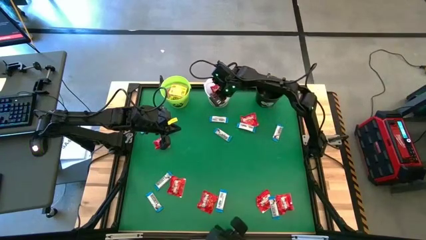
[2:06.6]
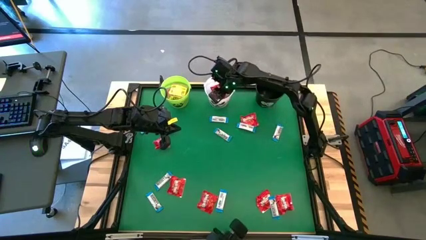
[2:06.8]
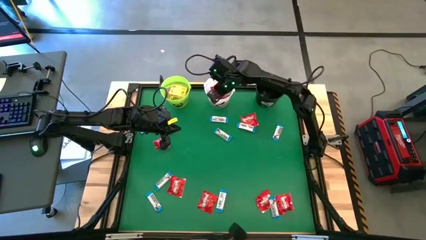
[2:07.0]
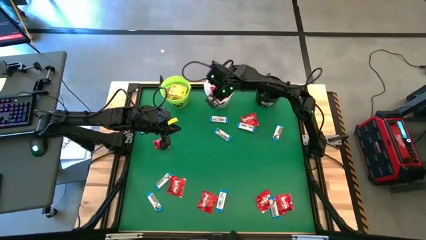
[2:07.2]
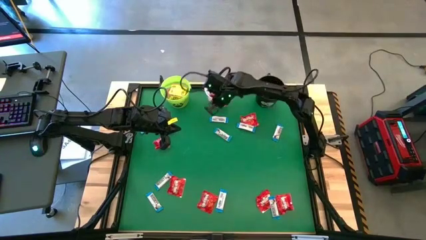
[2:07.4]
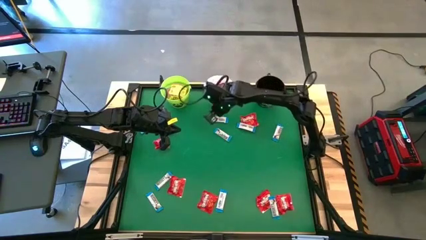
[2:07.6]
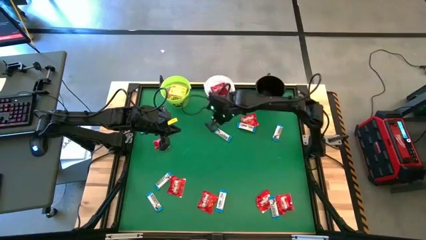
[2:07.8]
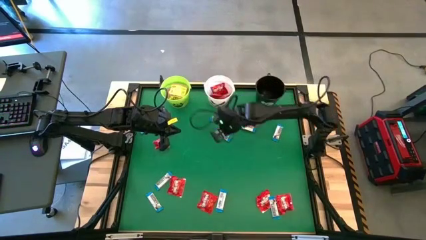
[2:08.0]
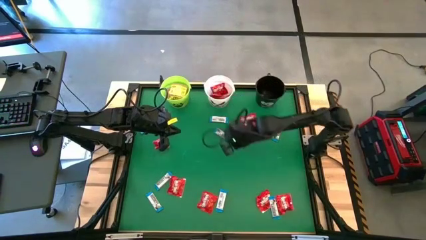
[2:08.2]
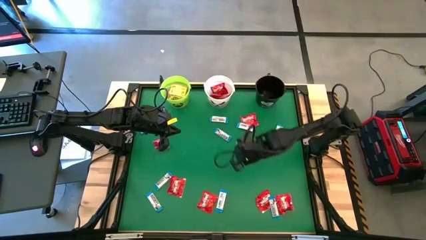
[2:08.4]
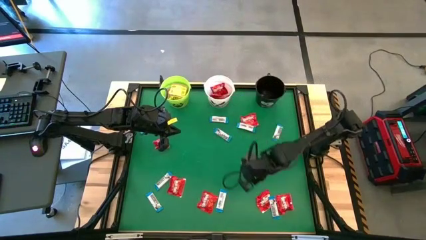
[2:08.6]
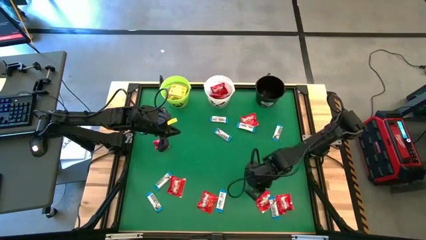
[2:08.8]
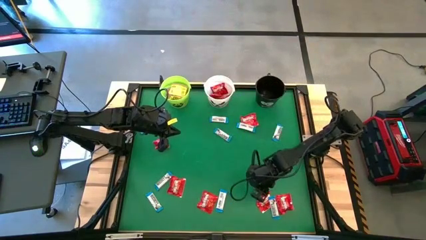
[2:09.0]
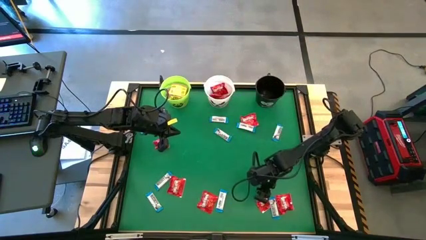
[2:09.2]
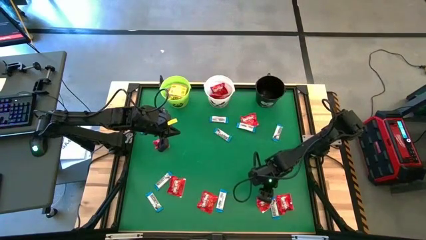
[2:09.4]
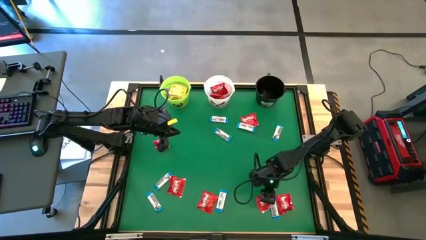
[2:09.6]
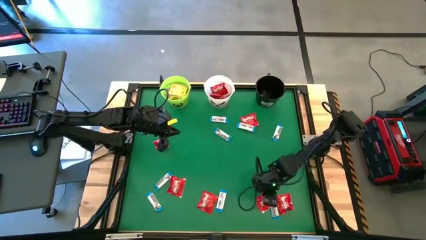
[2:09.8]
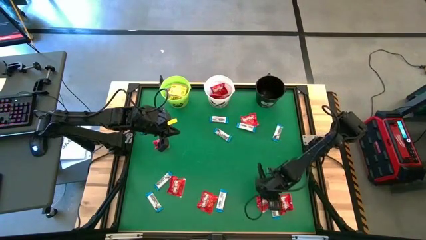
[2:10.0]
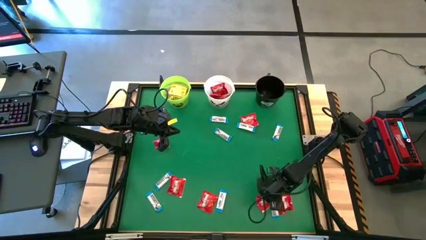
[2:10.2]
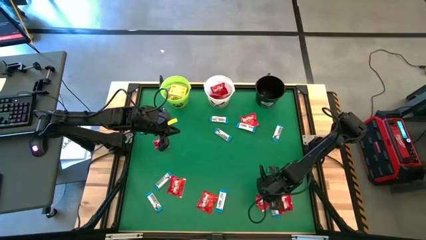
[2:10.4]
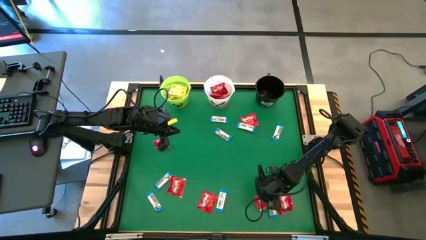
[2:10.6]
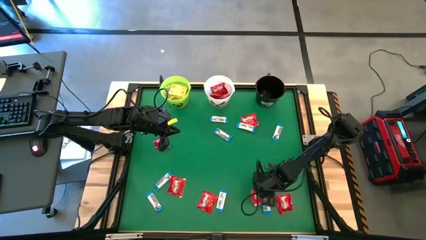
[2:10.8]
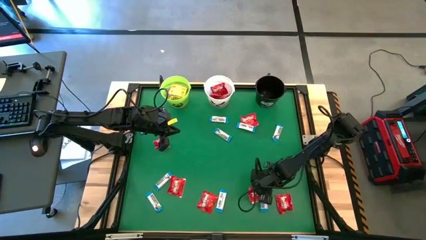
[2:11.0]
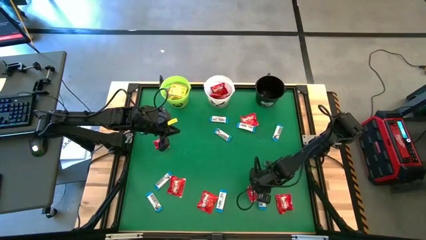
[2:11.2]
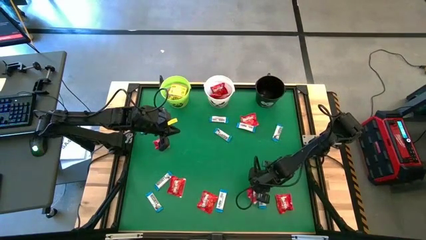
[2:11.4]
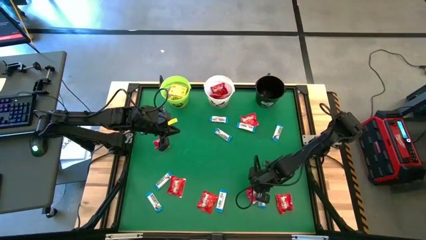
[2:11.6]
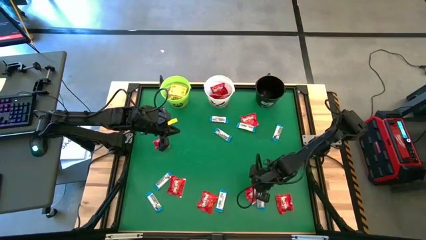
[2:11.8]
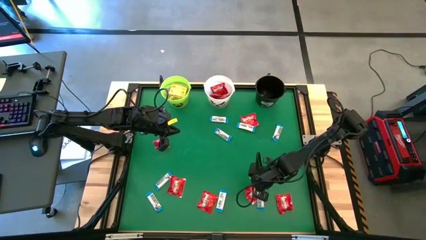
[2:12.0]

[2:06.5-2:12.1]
Task: Sort candy by brand, put in halloween buckets
Put the red candy into the white bucket

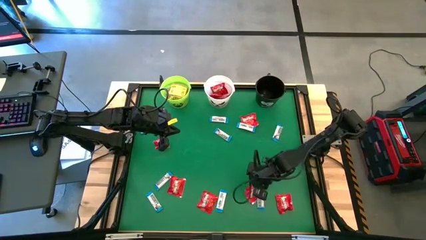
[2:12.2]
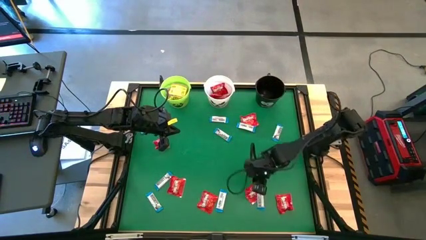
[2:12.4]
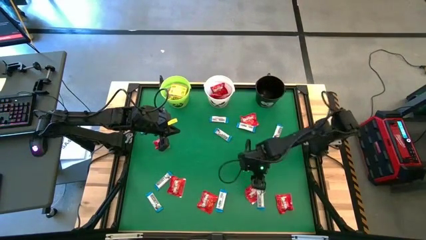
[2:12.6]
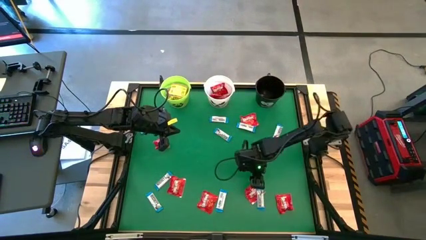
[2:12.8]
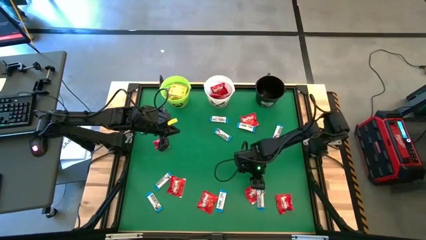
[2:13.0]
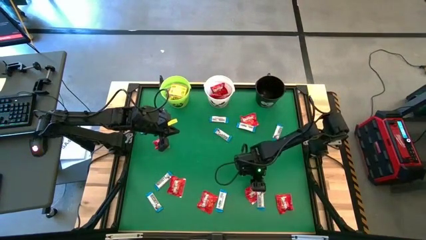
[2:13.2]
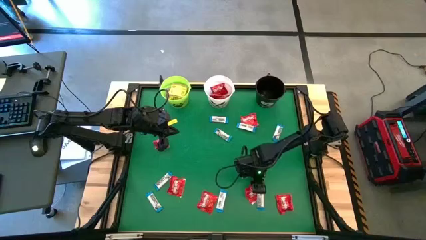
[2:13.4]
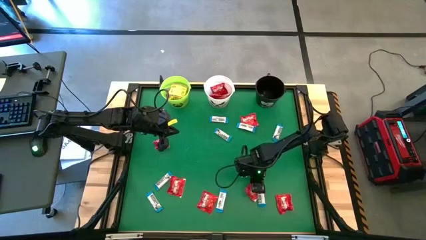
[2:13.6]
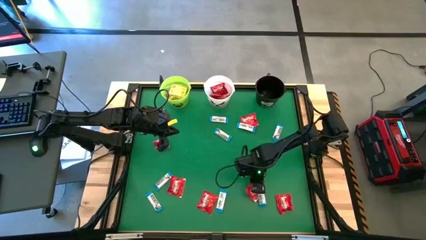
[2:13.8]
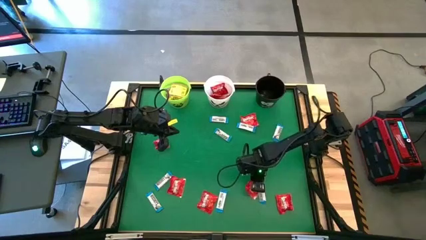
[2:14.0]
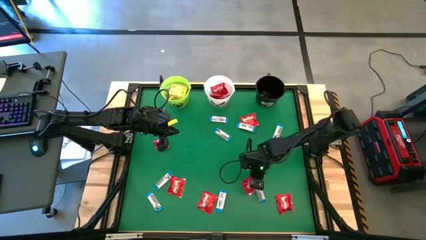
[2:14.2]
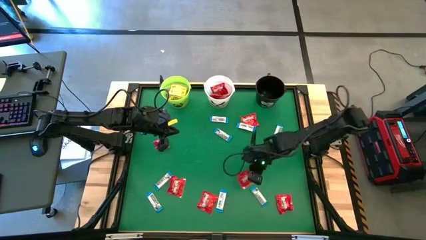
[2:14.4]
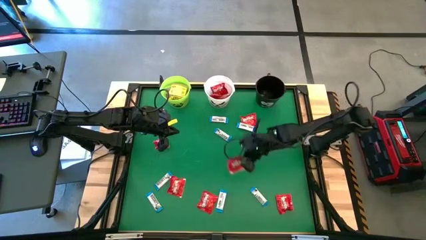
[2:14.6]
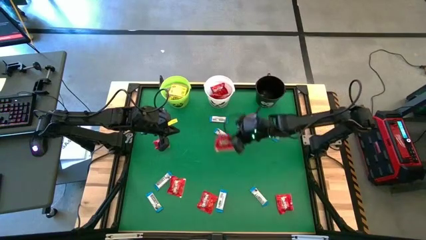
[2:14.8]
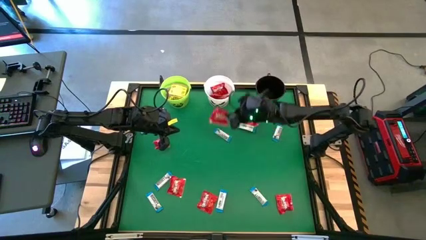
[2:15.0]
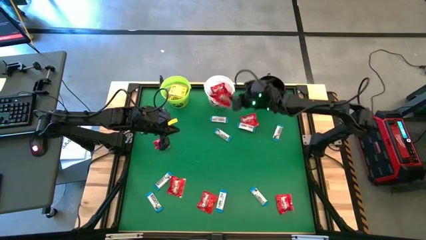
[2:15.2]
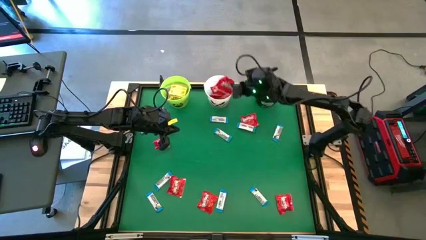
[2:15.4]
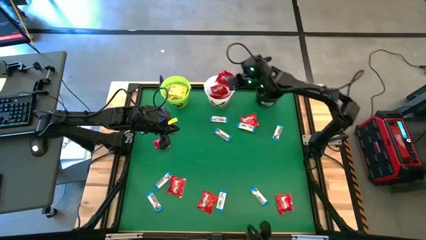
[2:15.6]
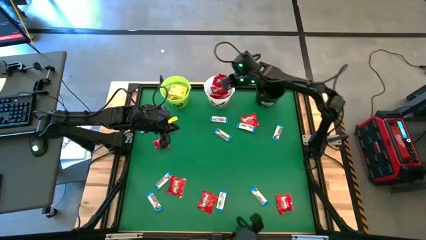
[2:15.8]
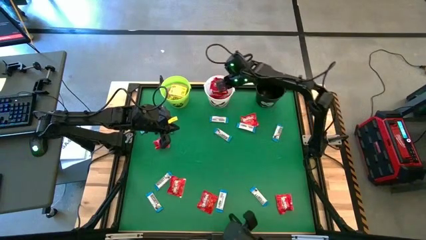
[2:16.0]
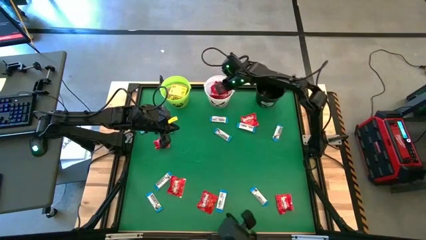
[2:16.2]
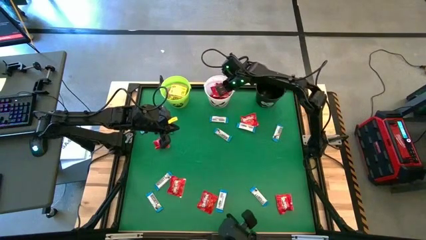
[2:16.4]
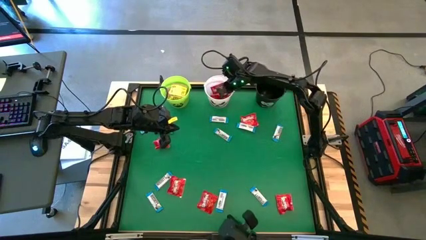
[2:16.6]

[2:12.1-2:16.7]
Put the red candy into the white bucket

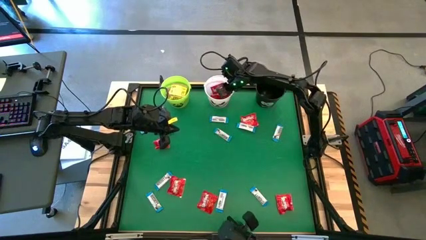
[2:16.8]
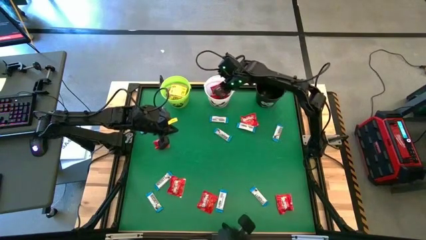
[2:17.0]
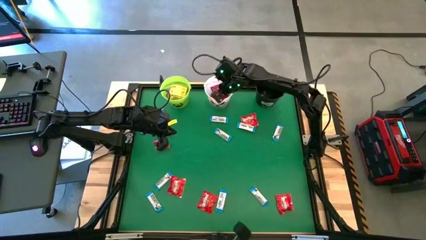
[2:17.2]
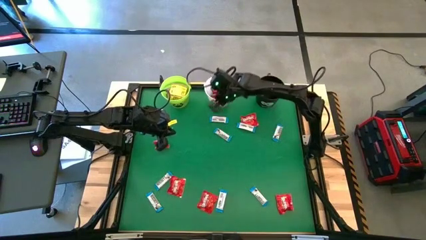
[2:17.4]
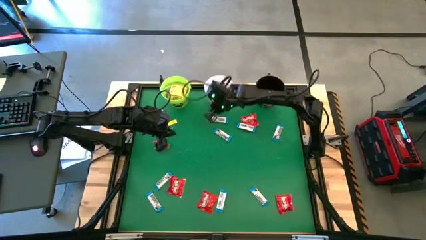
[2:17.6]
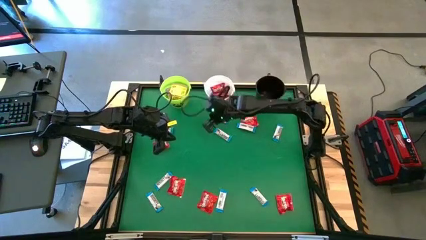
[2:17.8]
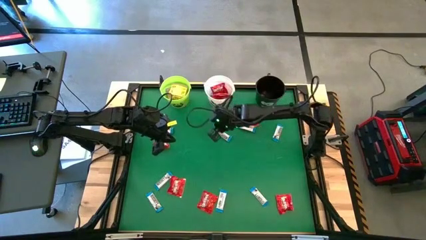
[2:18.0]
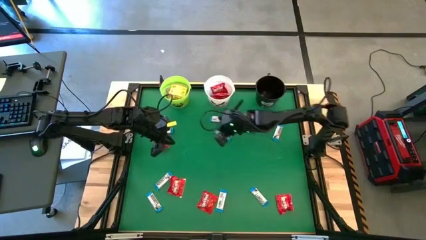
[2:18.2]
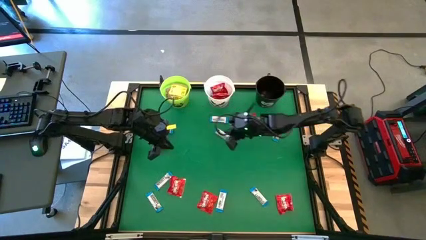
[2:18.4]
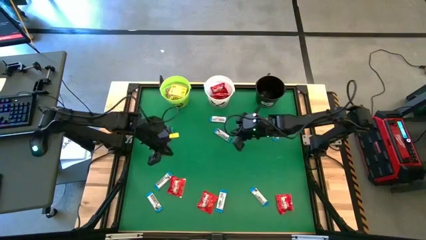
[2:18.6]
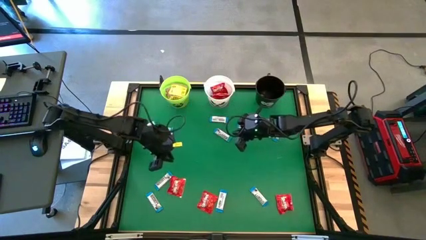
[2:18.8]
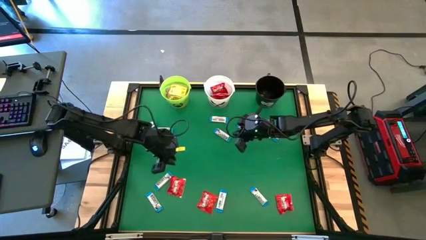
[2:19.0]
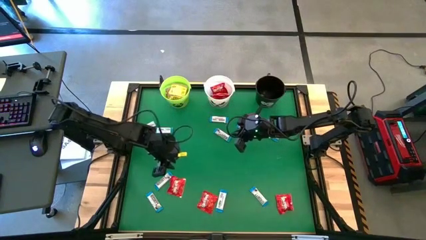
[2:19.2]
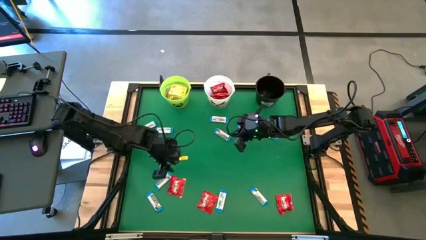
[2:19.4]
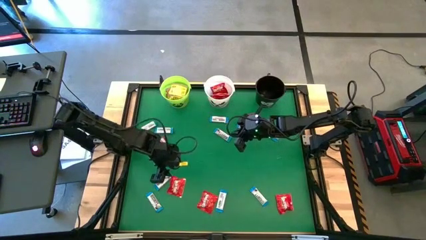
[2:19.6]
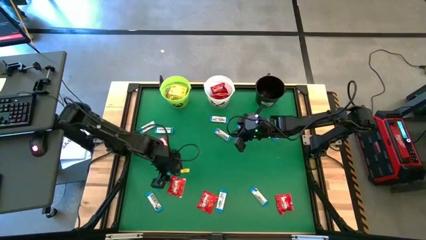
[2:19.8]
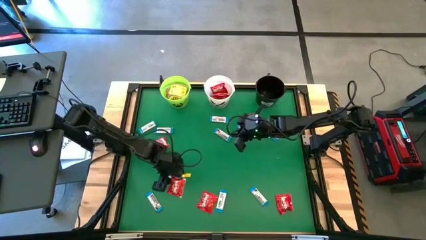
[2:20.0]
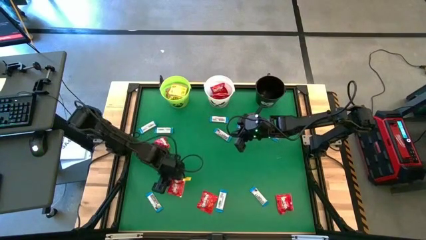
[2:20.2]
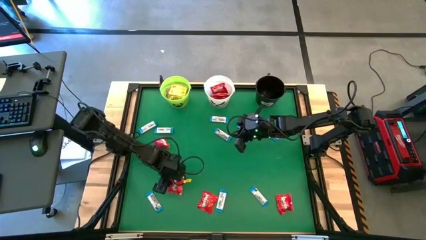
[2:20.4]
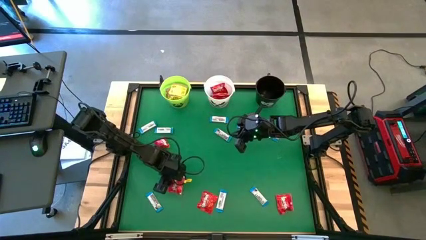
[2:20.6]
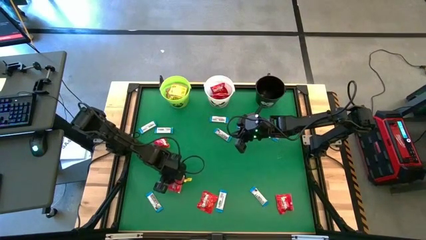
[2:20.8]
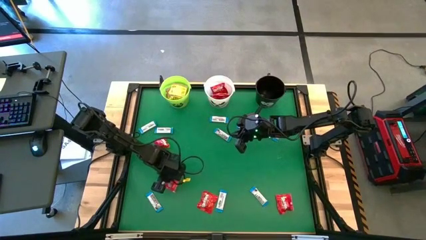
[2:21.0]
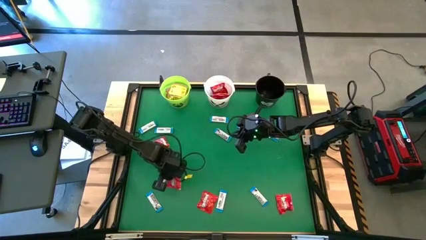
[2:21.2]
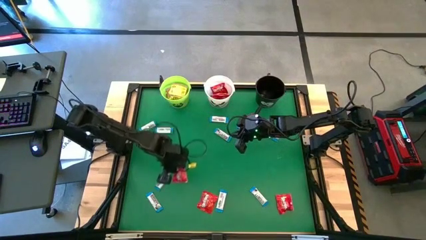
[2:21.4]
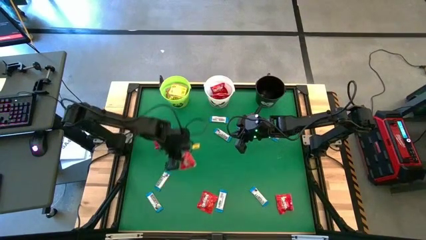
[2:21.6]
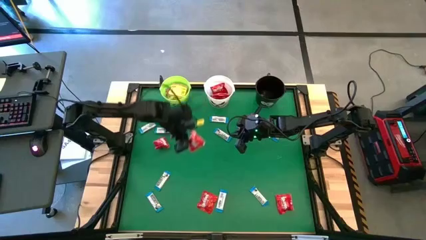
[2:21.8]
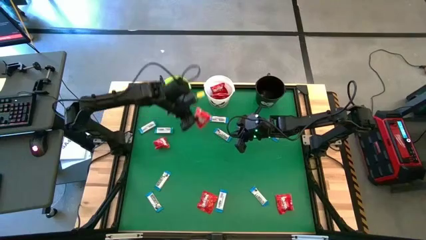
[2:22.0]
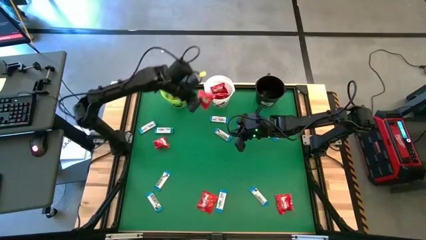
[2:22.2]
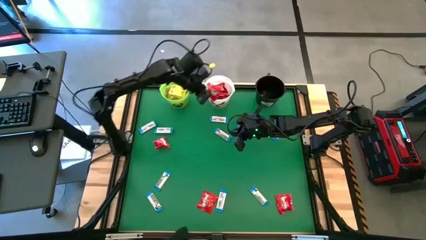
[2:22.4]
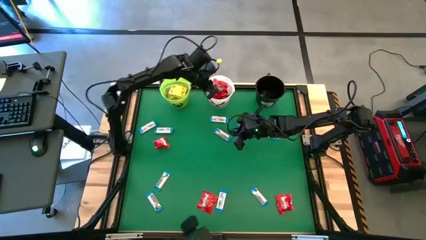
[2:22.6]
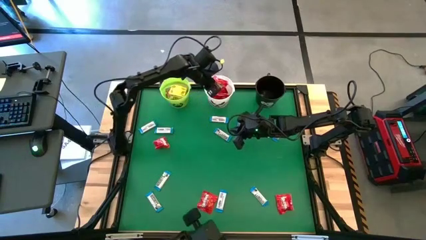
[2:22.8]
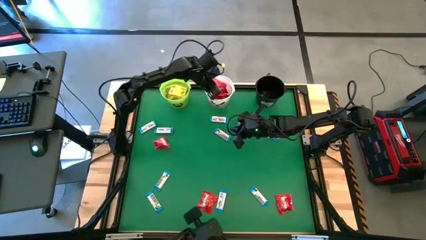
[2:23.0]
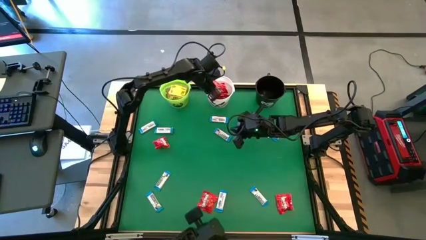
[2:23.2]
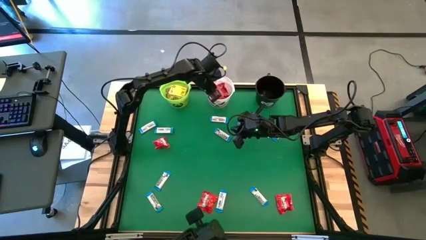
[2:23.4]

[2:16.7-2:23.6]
Put the red candy into the white bucket
